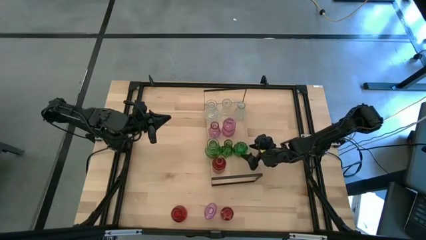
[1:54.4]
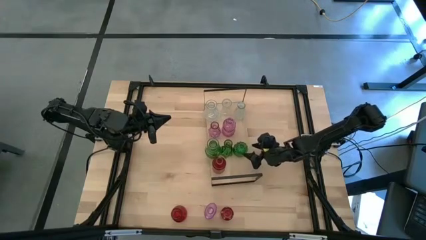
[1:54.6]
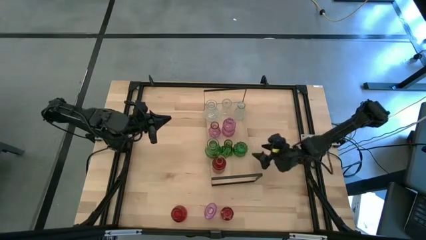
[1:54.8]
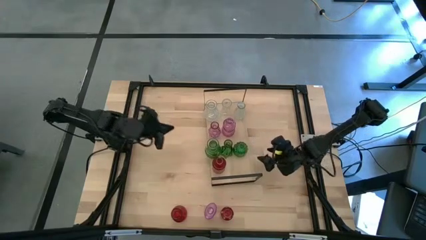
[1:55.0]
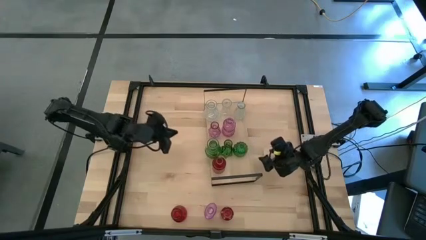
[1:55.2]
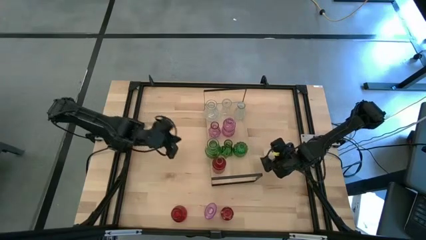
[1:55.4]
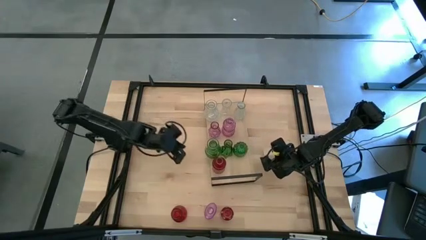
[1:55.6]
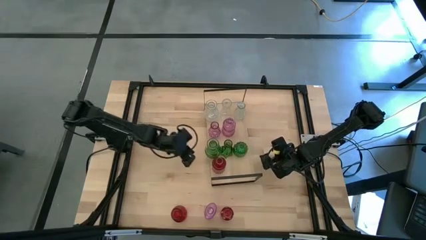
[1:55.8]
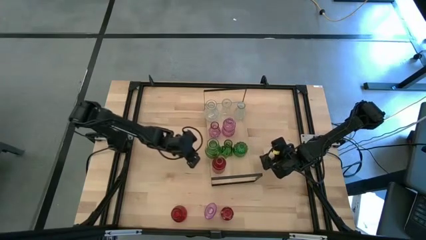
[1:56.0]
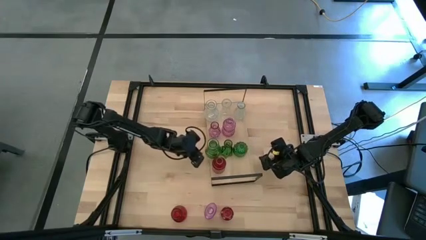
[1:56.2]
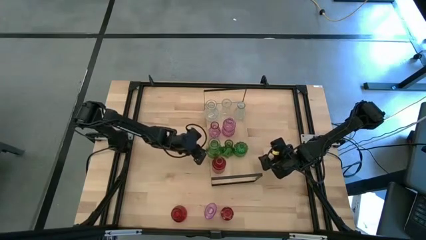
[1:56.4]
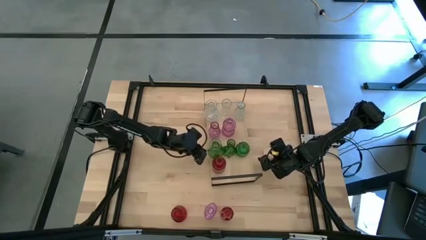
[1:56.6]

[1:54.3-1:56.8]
Task: sort vases onto shelf
Adjust the green vases on the shelf

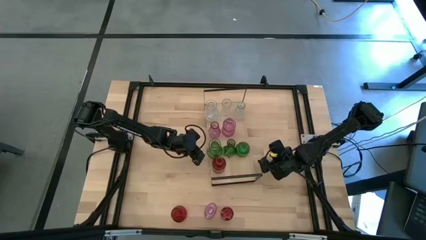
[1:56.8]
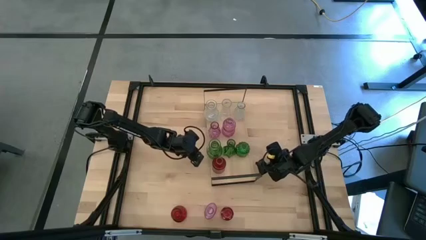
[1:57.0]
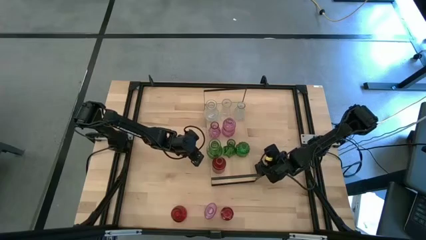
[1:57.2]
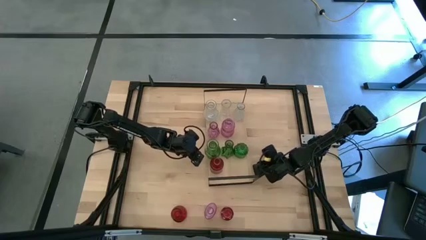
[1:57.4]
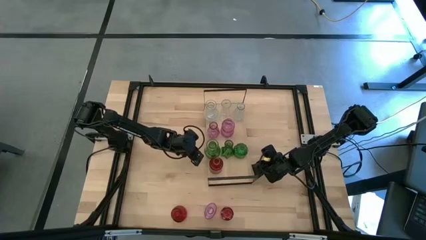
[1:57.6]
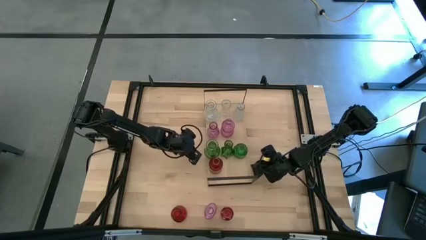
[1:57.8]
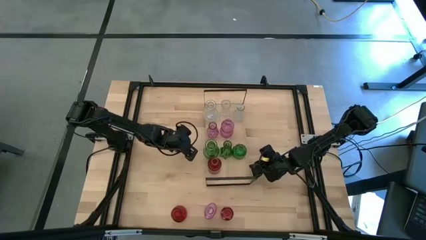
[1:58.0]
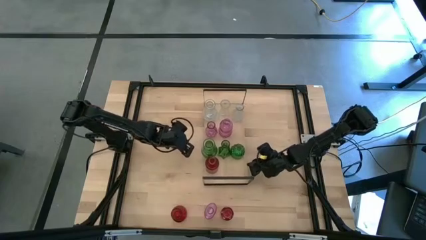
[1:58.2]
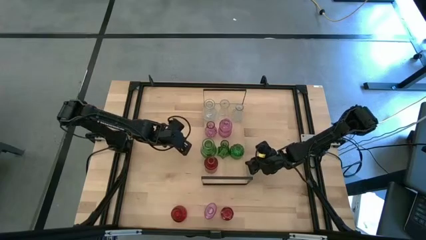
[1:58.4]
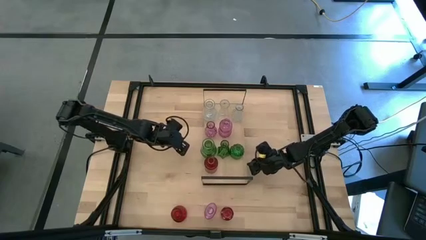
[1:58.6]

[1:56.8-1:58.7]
Adjust the shelf

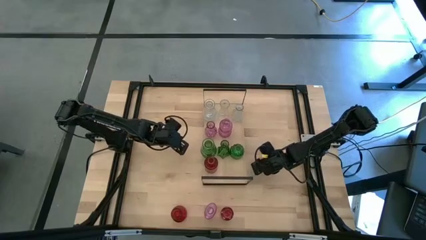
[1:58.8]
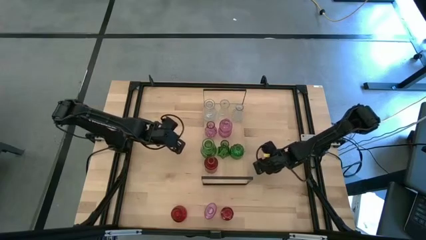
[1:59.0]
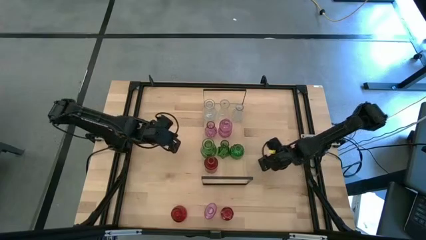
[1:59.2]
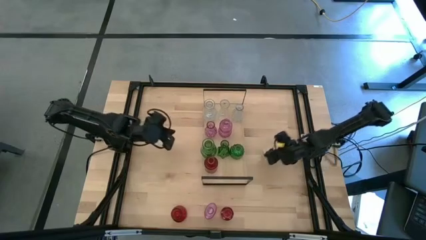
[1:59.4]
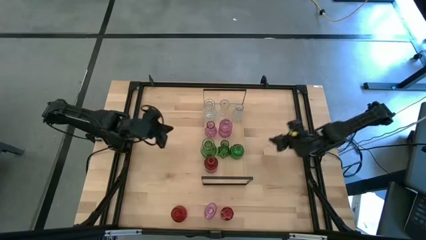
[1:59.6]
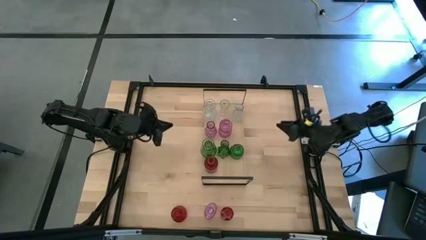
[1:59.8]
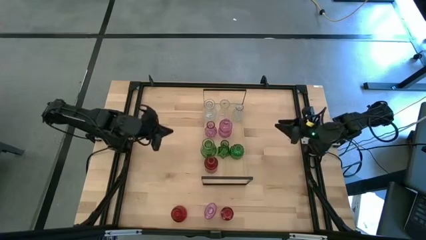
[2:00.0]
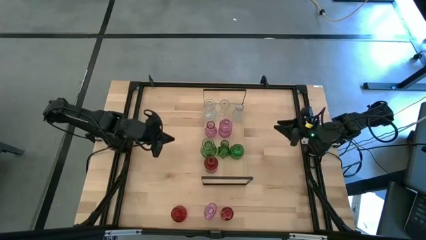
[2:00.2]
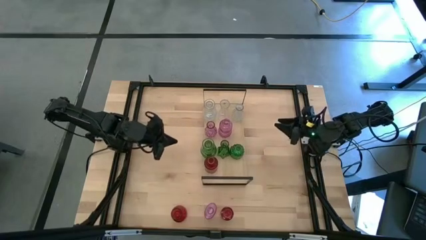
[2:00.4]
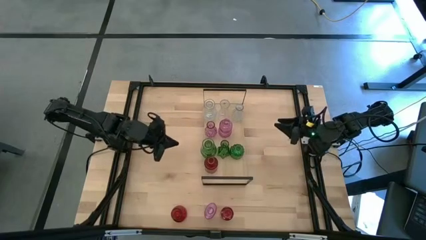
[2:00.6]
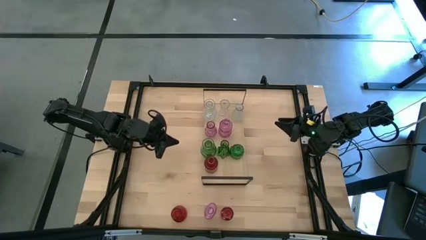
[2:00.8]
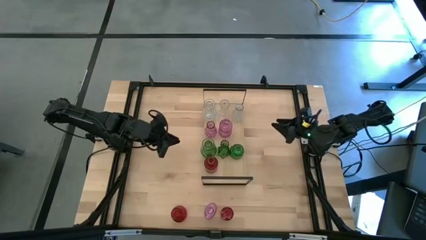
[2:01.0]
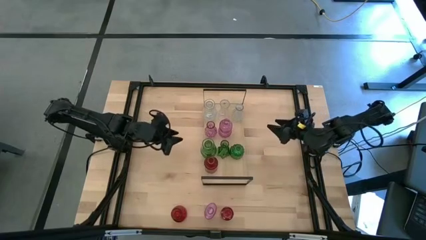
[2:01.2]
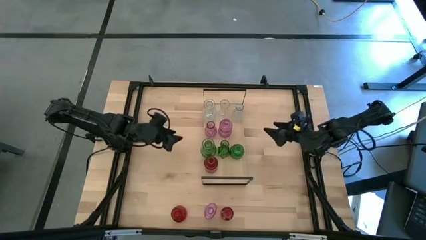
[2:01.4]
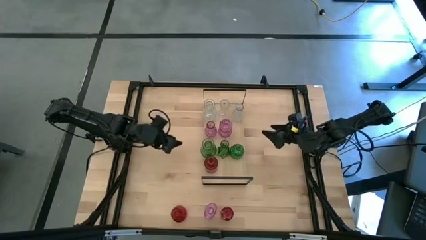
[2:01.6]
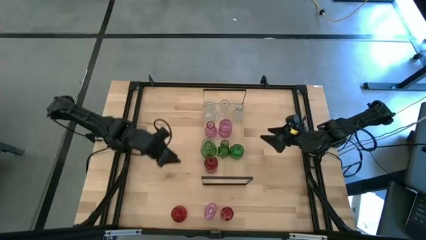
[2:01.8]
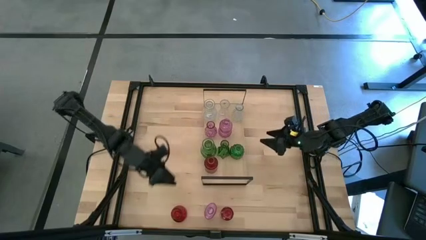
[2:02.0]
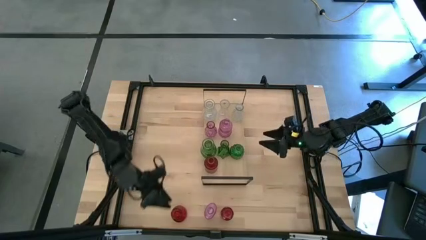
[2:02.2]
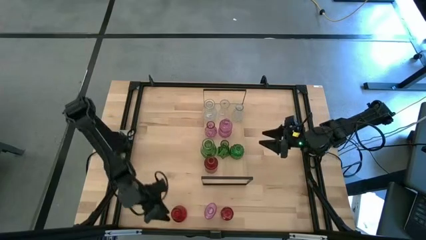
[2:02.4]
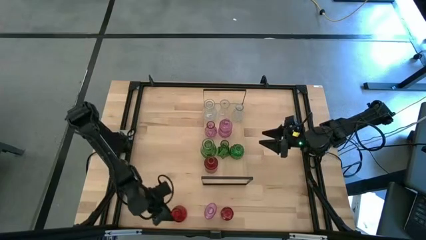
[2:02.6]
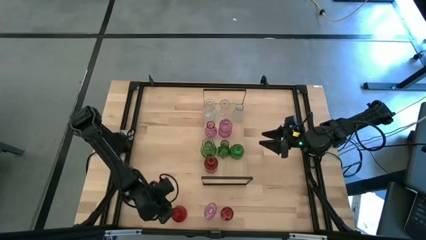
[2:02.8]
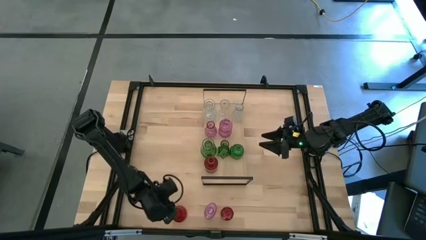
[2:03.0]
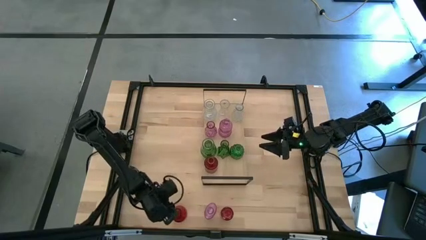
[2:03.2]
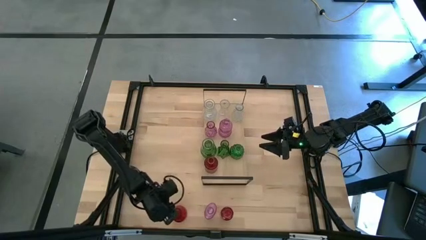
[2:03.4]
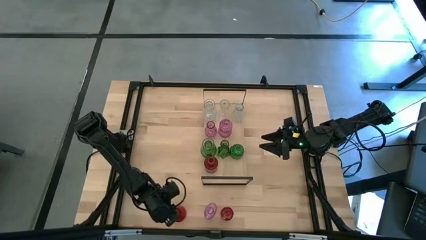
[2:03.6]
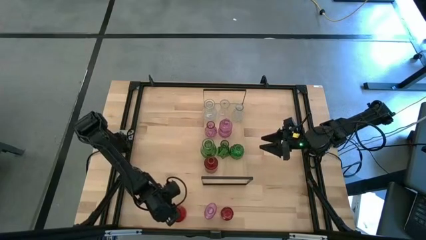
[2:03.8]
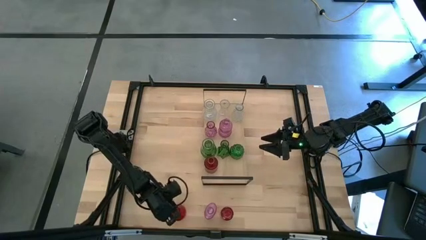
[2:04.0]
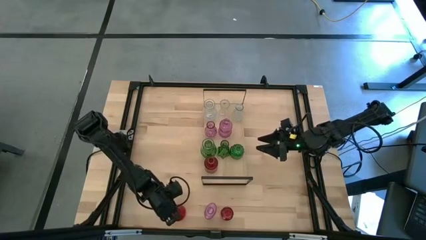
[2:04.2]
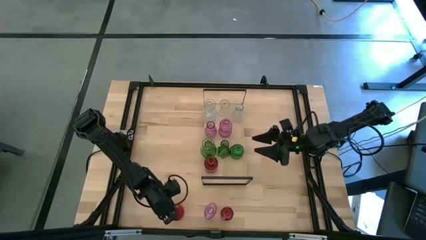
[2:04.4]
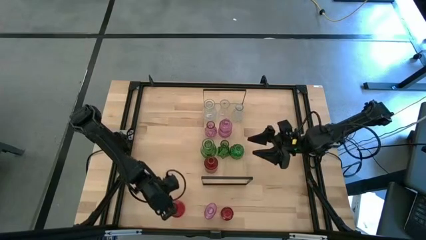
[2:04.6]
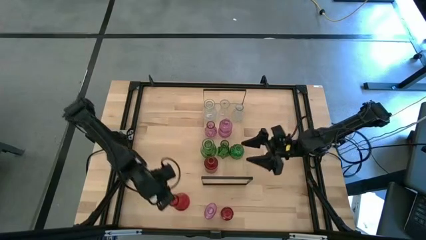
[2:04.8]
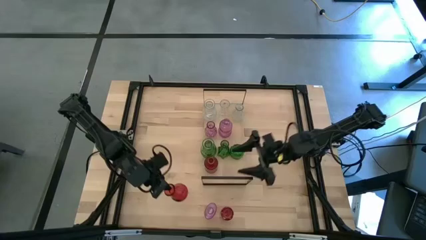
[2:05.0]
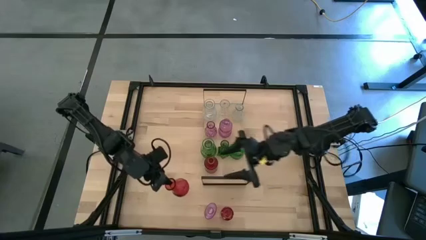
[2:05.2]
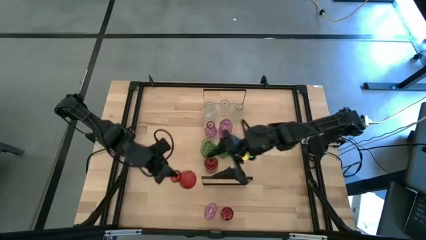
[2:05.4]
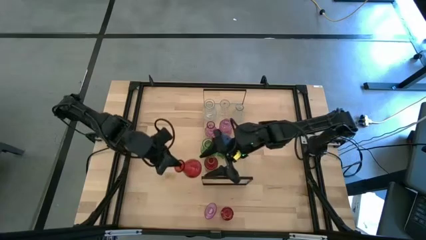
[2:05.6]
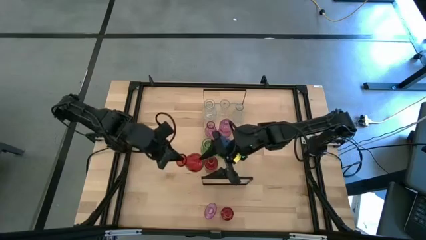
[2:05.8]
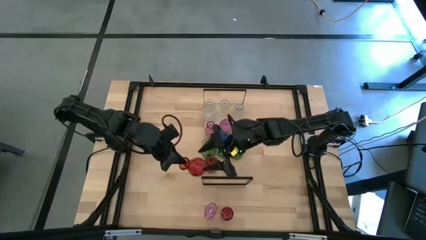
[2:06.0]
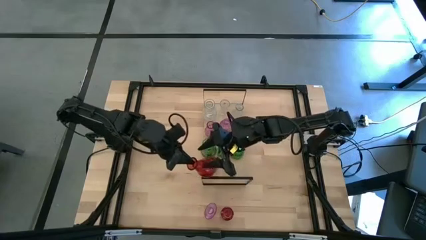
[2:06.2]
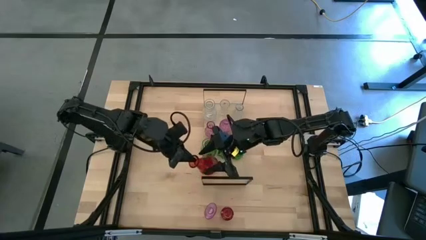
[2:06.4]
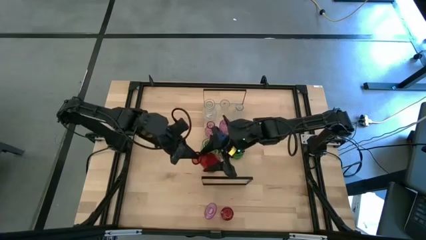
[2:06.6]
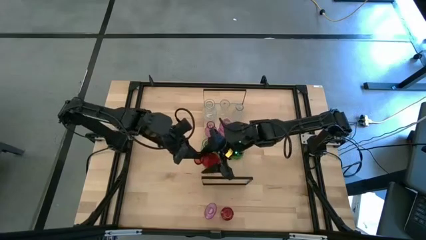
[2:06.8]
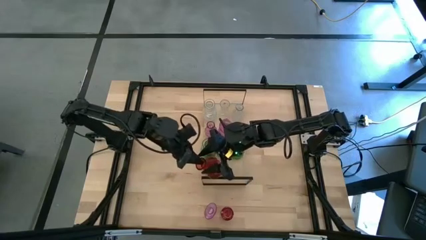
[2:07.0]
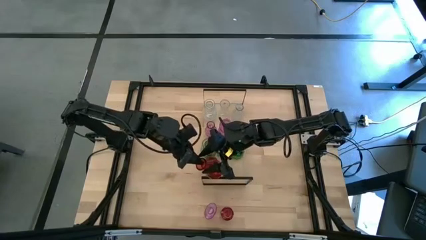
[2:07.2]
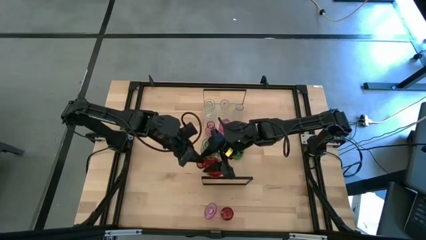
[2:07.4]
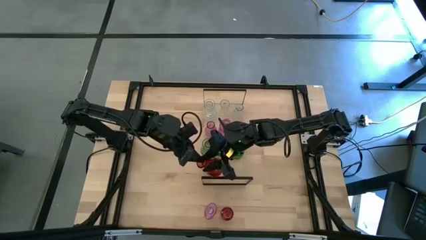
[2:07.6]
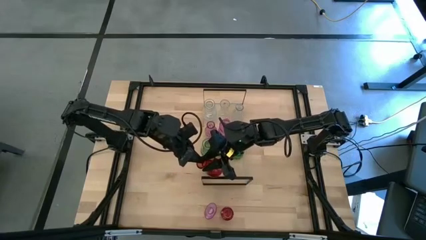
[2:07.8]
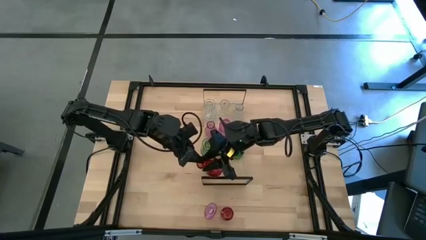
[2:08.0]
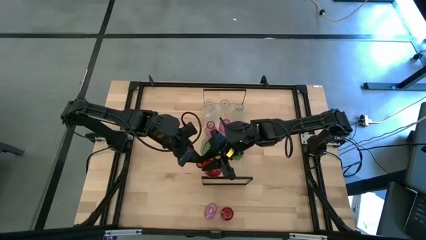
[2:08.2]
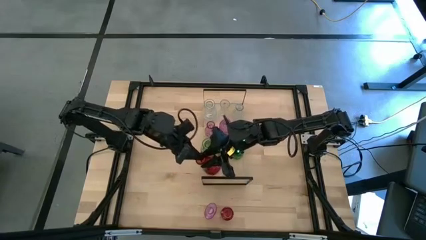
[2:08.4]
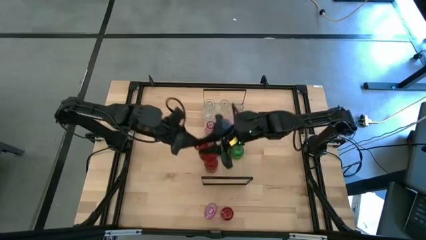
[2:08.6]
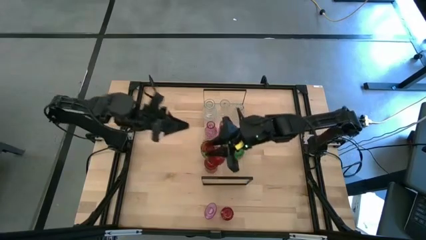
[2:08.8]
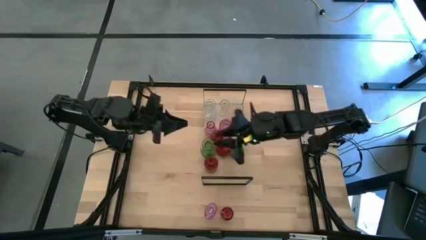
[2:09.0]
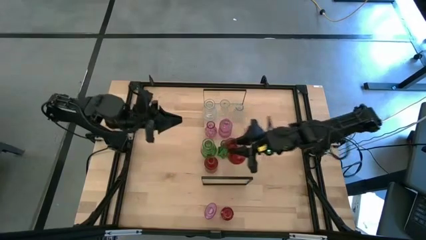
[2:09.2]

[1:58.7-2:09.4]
Put the left red vase on the shelf aligned with the other red vase
